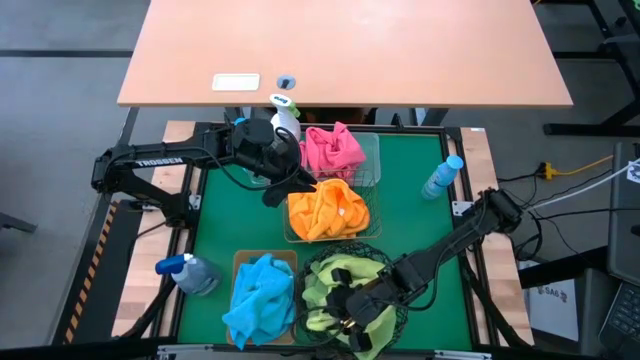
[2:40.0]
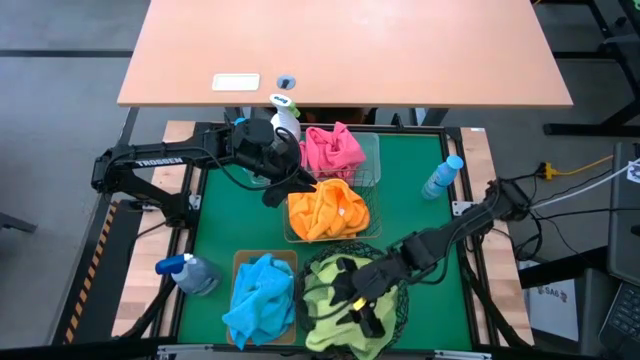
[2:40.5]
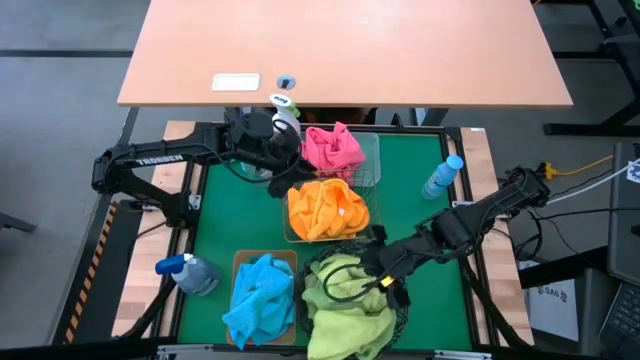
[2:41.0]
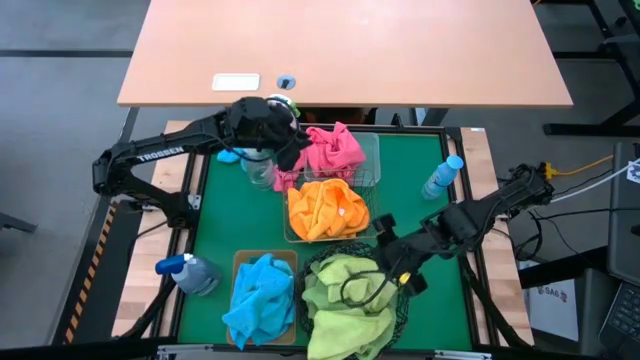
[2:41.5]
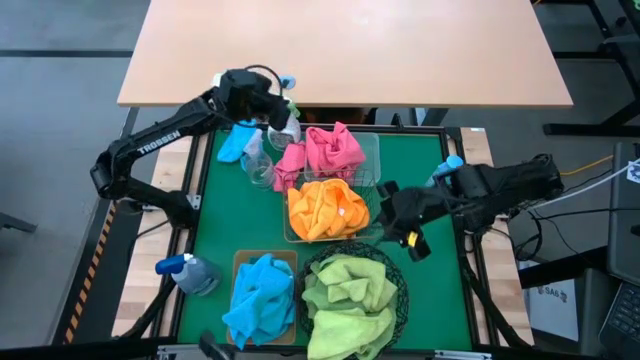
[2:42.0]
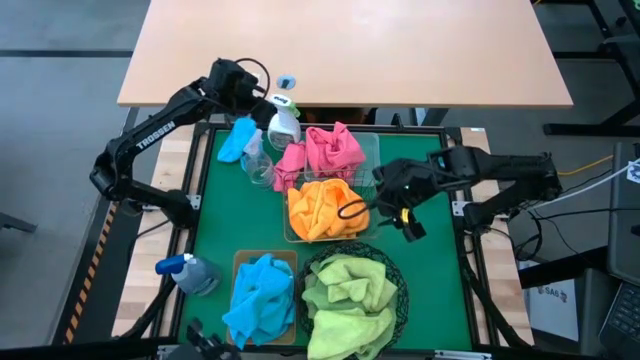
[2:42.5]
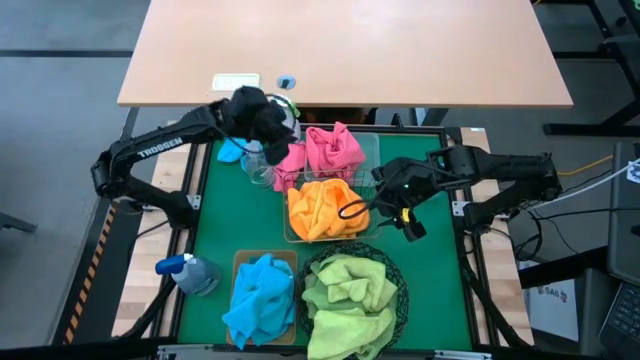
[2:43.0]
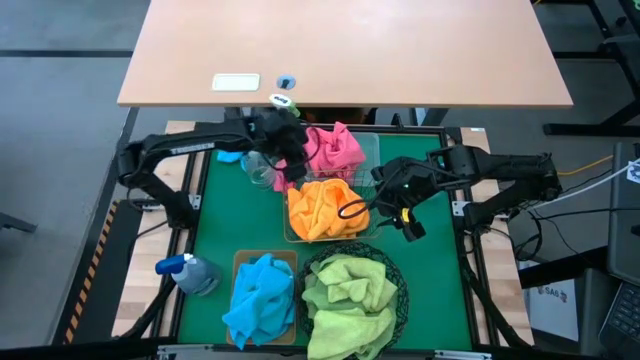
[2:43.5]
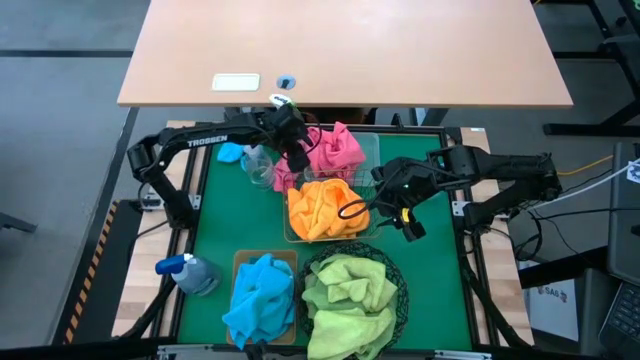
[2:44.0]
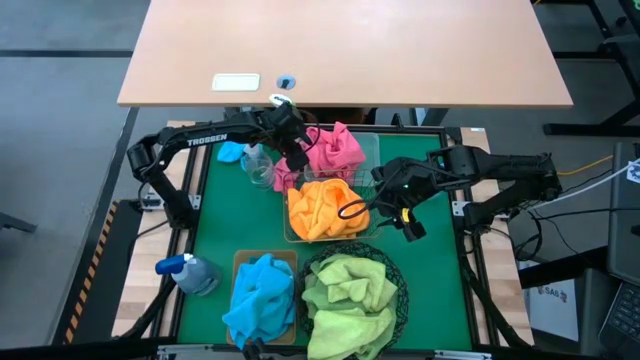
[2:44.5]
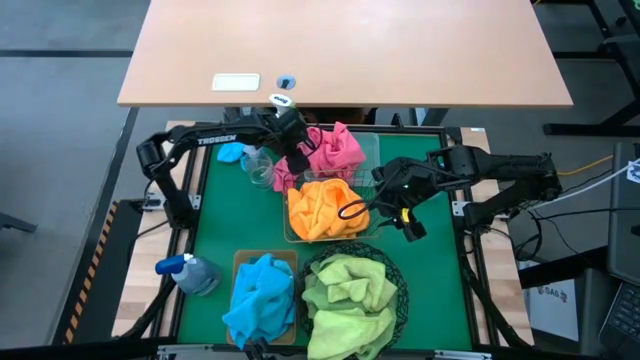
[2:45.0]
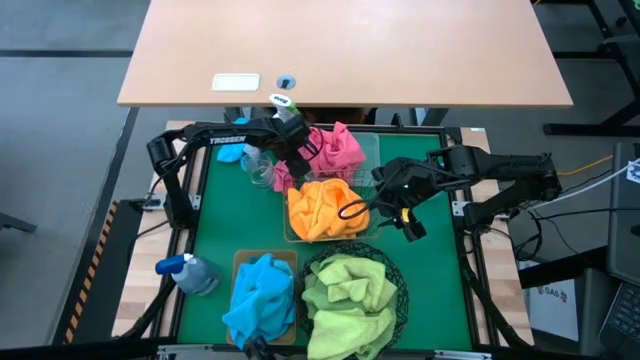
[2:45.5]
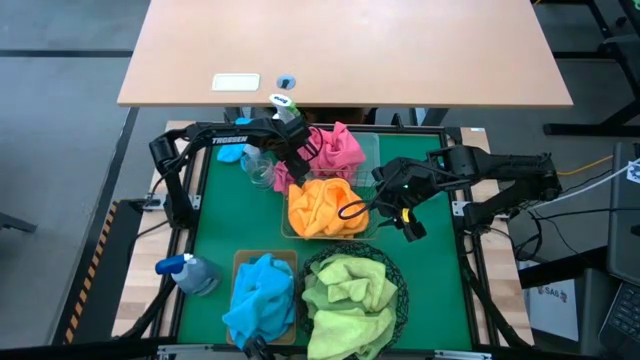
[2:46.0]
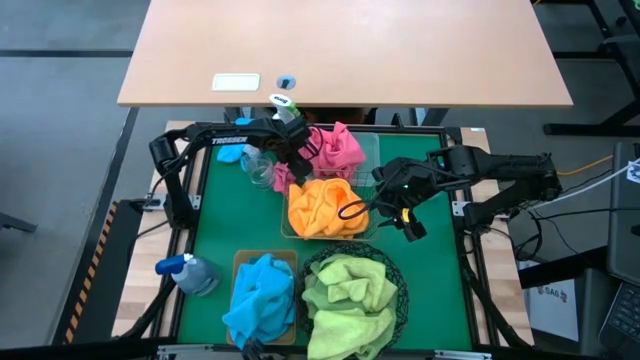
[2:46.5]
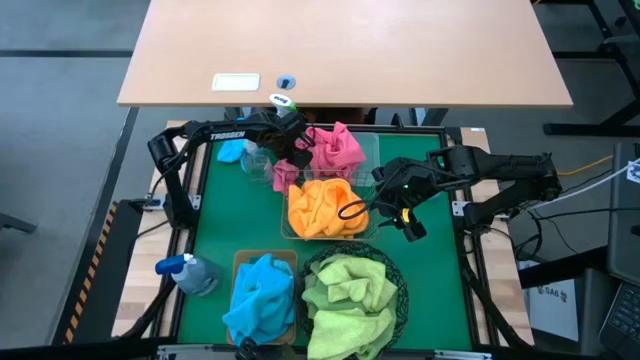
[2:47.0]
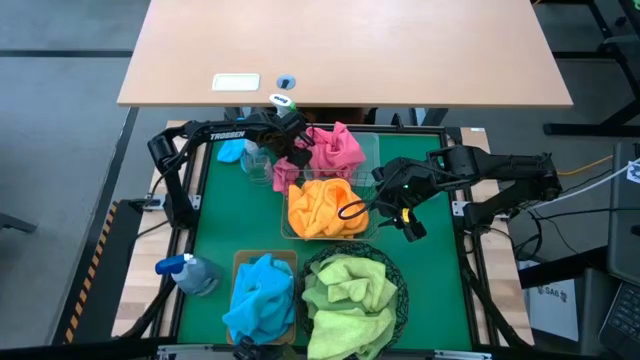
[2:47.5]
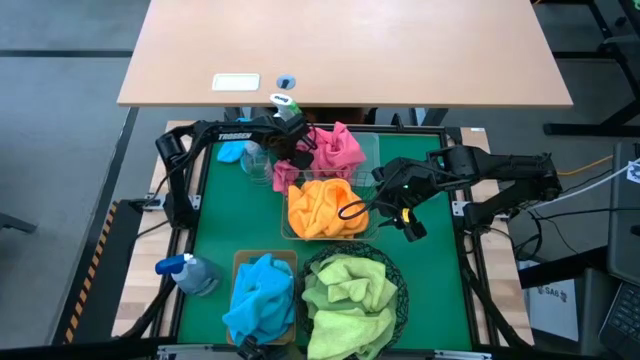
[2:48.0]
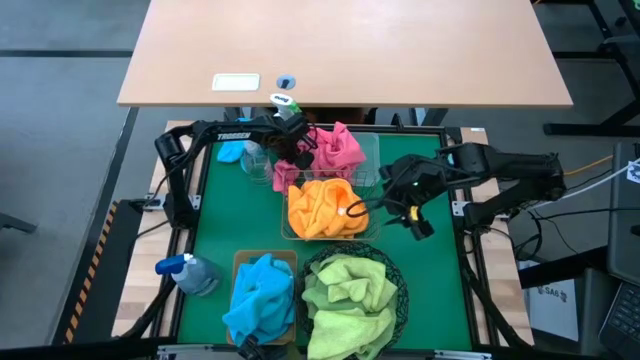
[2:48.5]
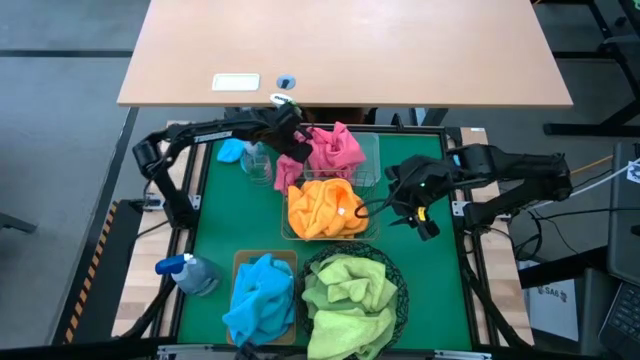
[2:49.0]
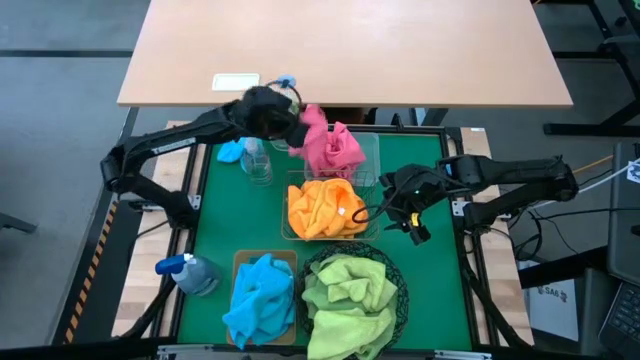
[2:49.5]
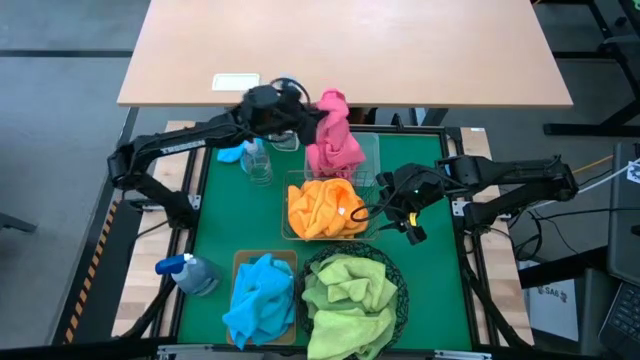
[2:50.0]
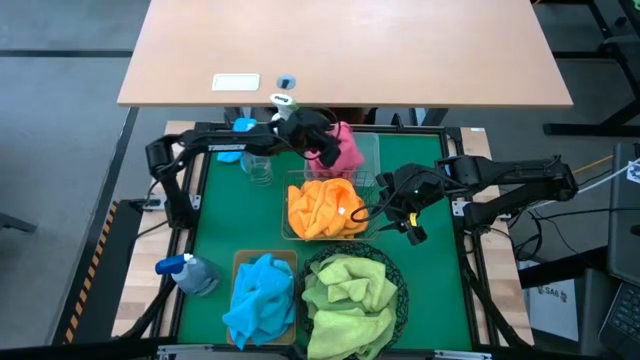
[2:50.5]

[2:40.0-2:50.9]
Task: Sort microfiber towel by color & place in baskets
Put the pink microfiber towel into the transparent bin

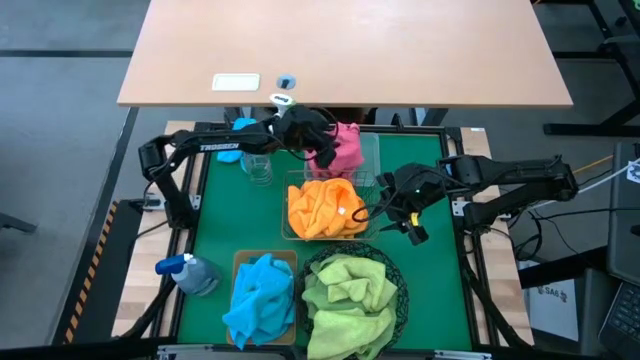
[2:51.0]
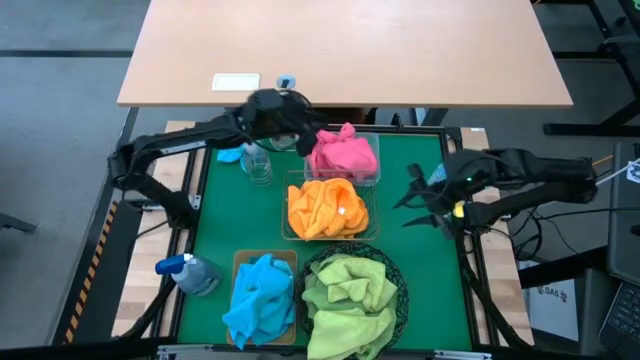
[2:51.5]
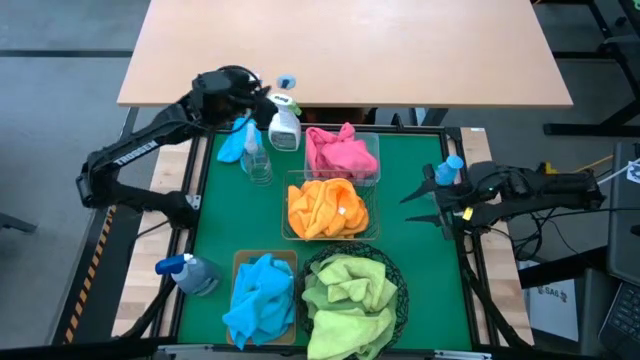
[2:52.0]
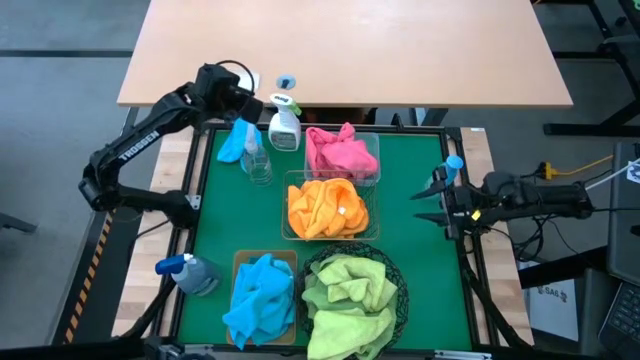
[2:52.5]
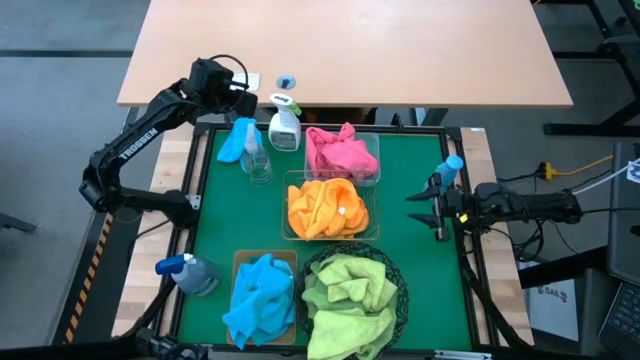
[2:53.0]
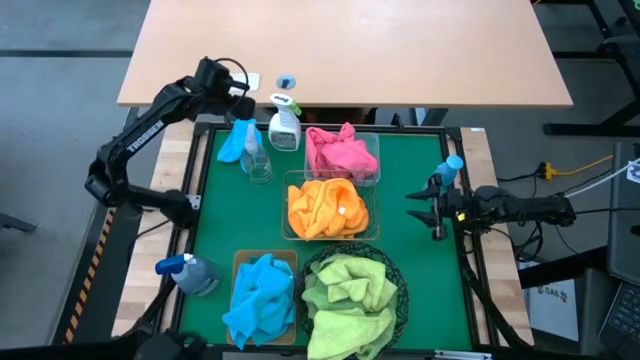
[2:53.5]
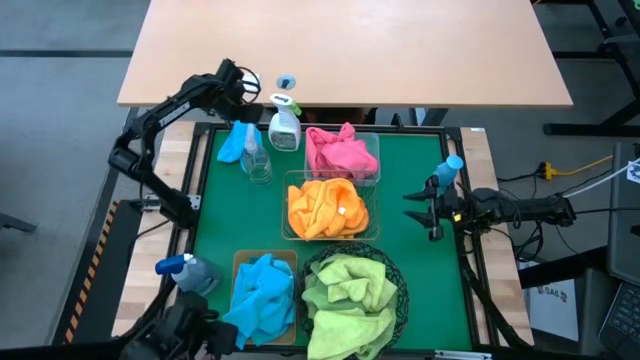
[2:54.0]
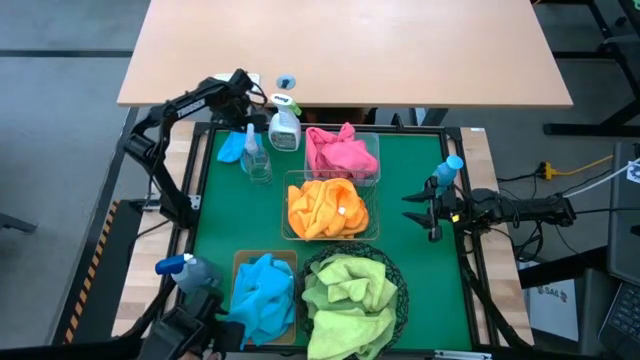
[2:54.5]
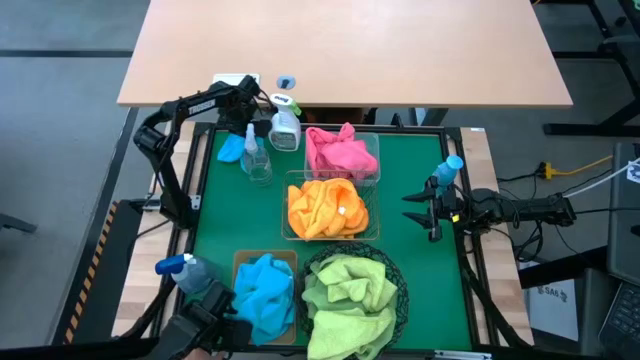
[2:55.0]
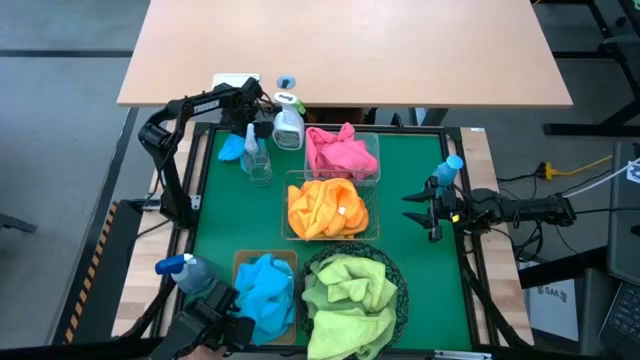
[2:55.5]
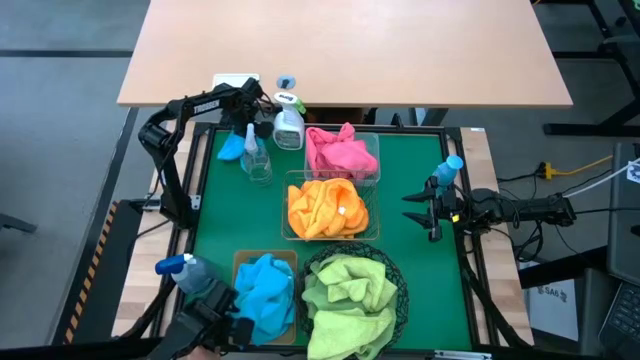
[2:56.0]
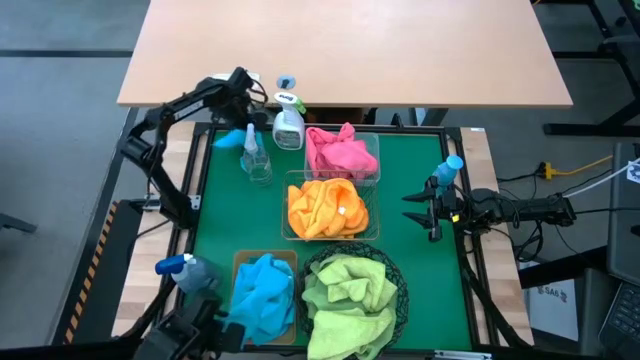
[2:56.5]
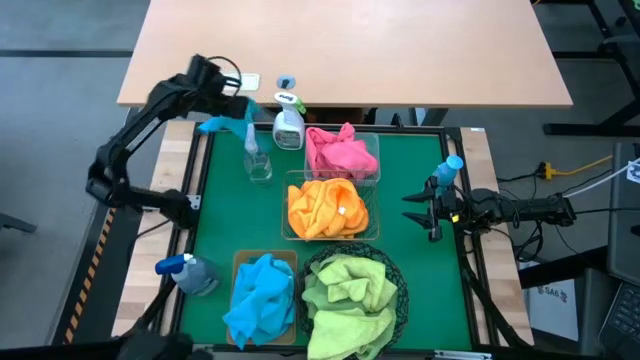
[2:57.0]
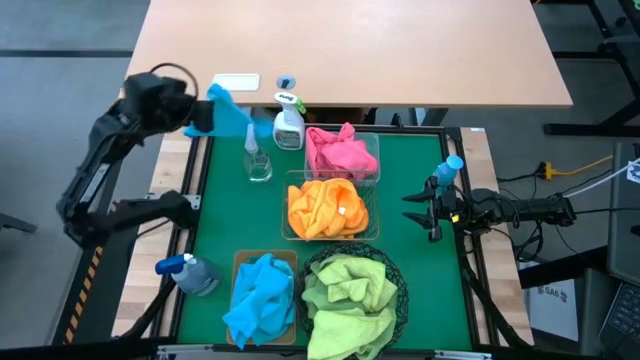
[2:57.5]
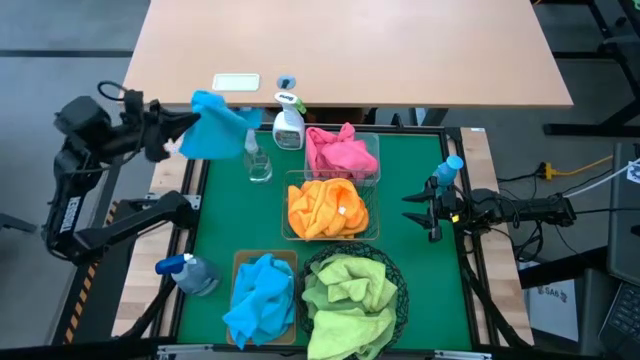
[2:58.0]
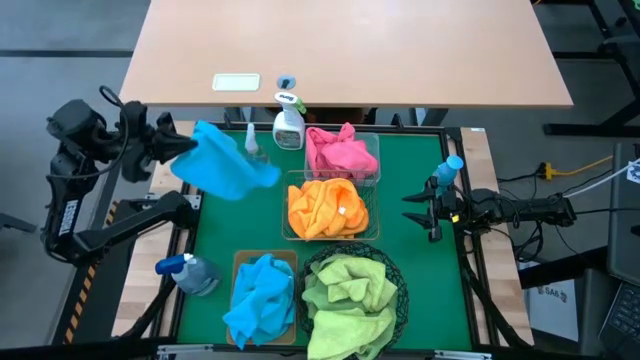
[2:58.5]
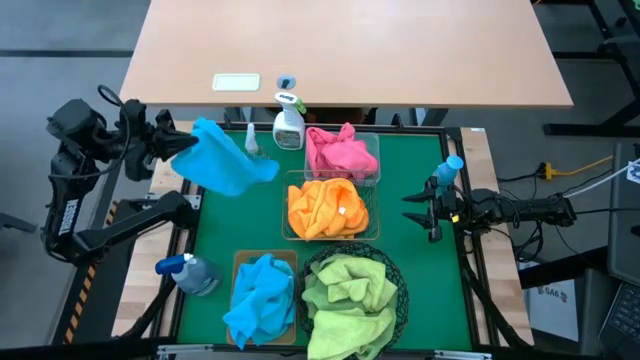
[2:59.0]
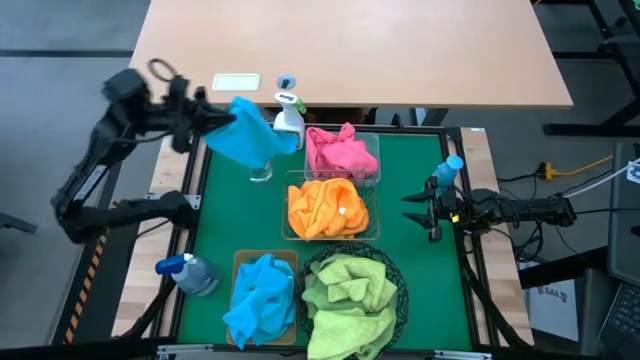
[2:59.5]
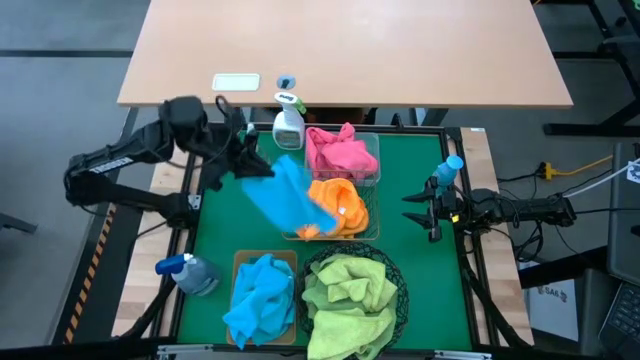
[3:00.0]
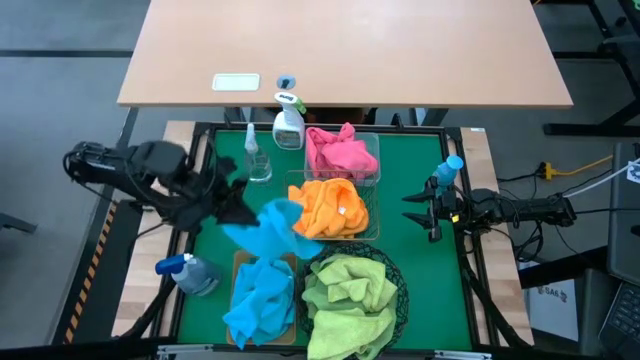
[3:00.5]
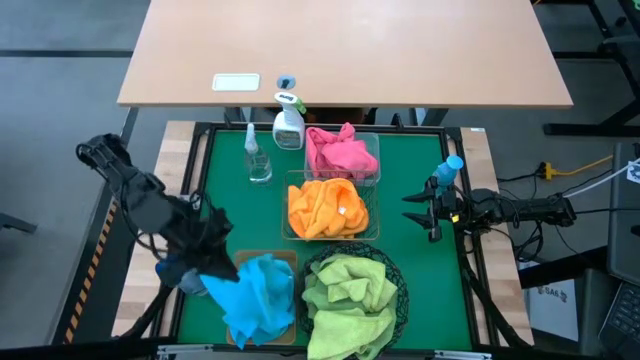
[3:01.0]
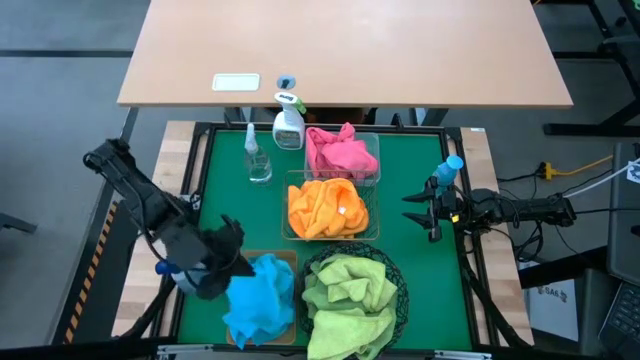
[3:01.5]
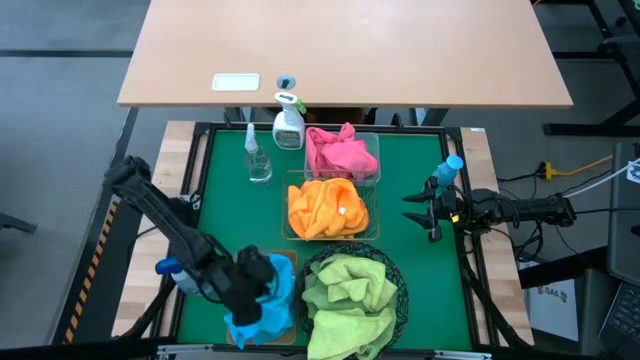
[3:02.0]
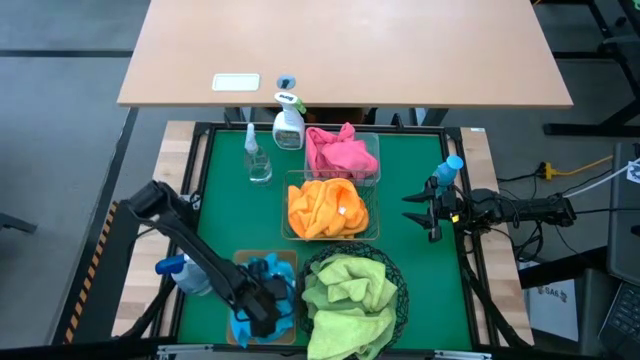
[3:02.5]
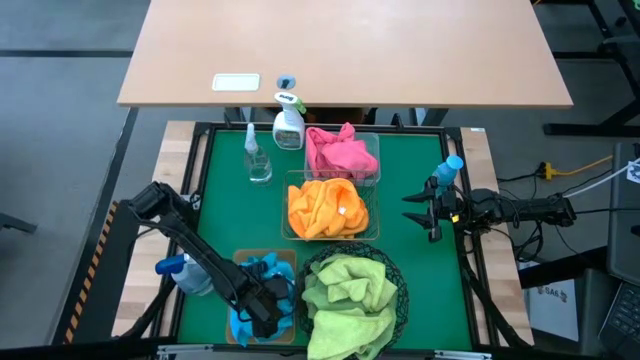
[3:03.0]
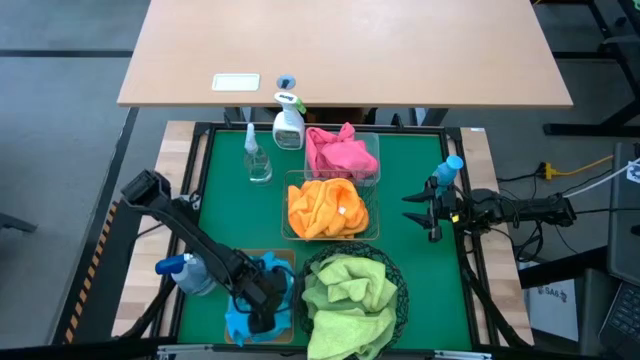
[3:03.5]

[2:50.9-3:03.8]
Put the blue microfiber towel into the orange bin
